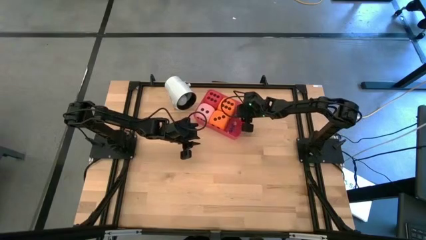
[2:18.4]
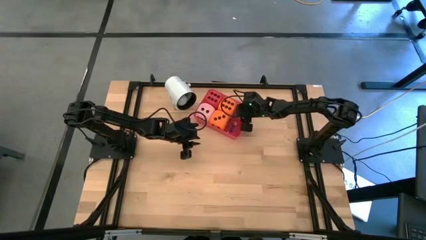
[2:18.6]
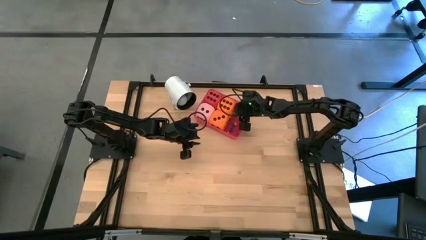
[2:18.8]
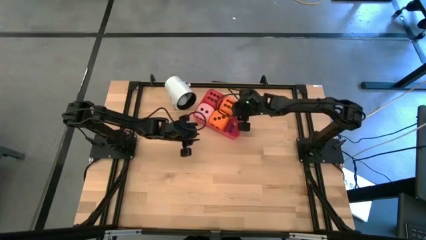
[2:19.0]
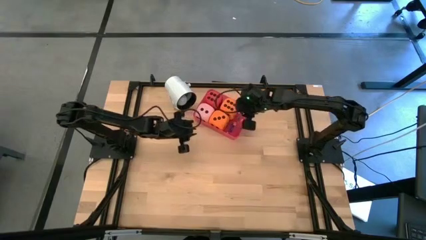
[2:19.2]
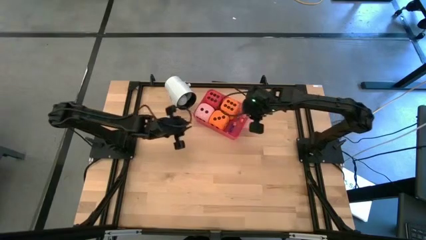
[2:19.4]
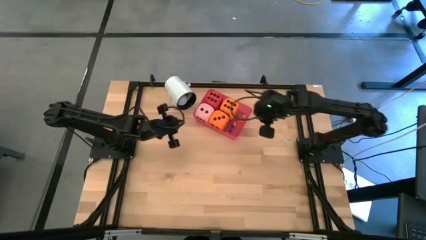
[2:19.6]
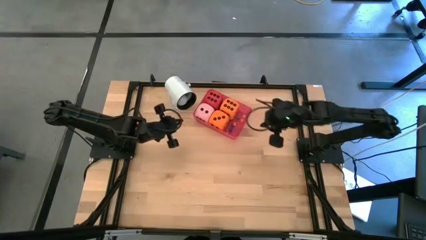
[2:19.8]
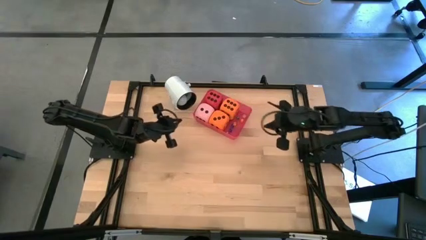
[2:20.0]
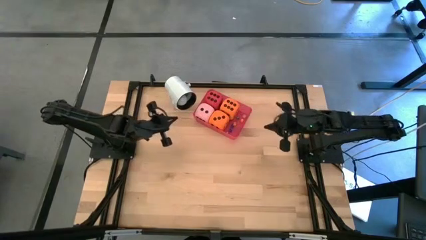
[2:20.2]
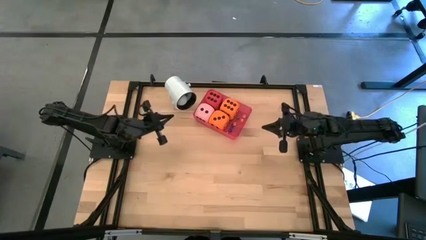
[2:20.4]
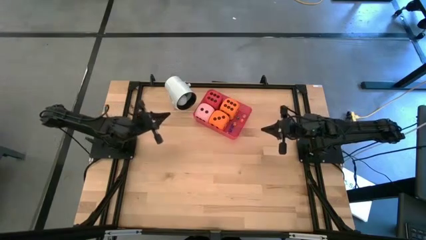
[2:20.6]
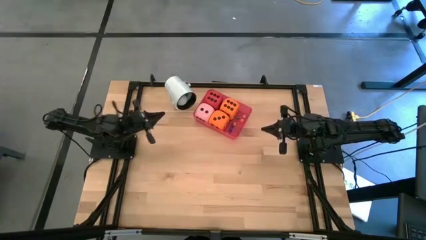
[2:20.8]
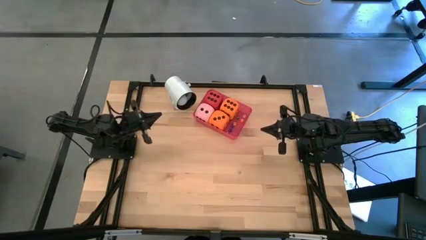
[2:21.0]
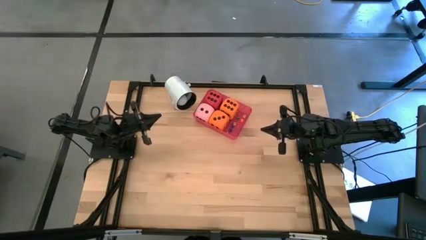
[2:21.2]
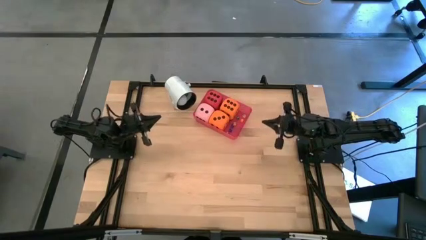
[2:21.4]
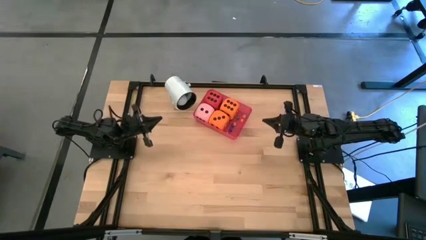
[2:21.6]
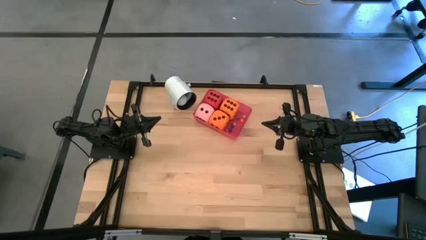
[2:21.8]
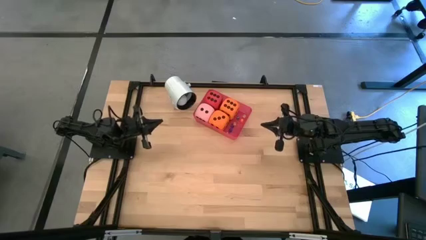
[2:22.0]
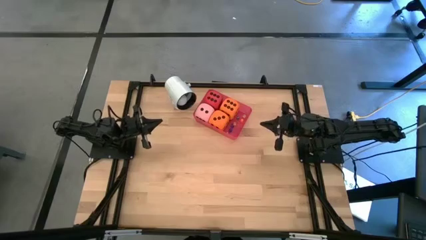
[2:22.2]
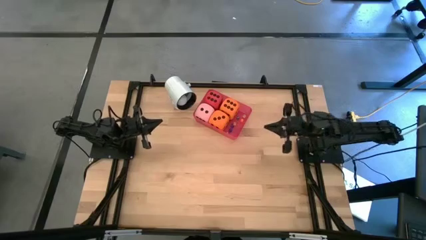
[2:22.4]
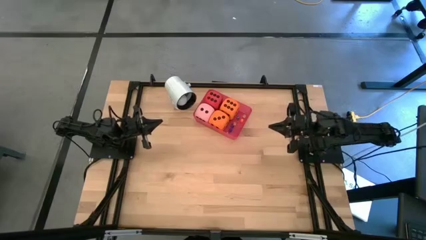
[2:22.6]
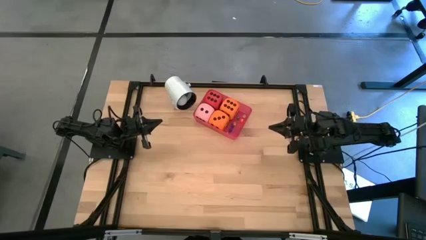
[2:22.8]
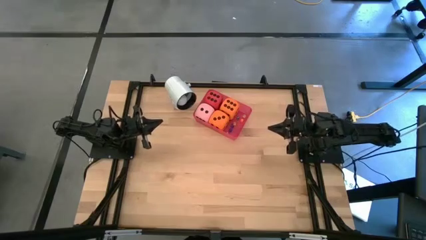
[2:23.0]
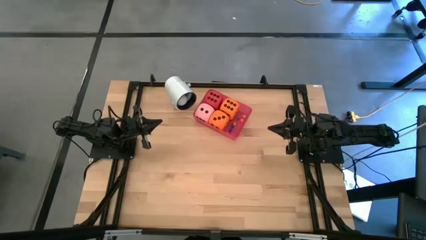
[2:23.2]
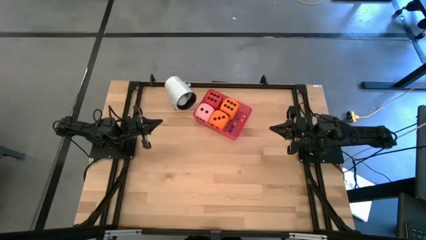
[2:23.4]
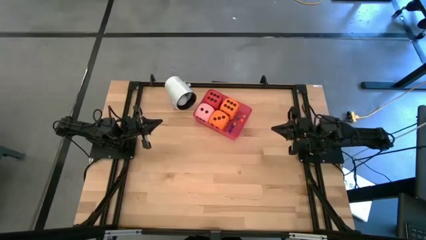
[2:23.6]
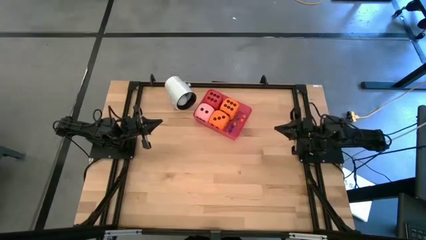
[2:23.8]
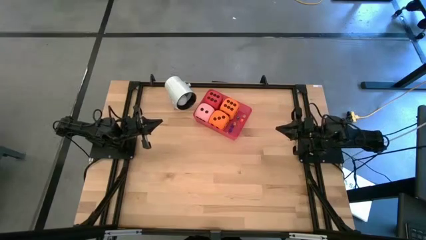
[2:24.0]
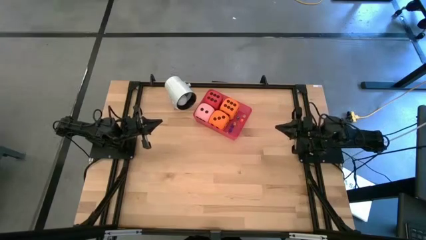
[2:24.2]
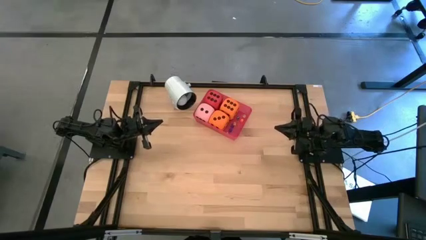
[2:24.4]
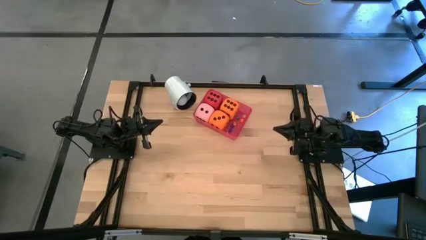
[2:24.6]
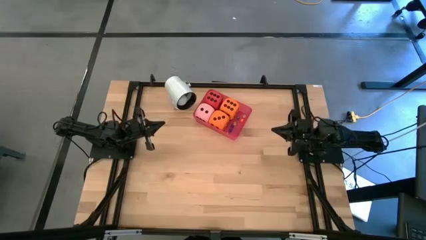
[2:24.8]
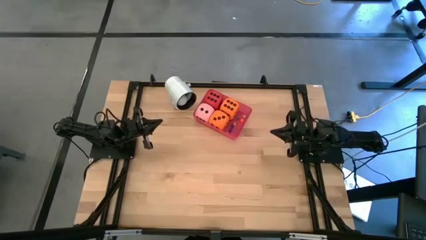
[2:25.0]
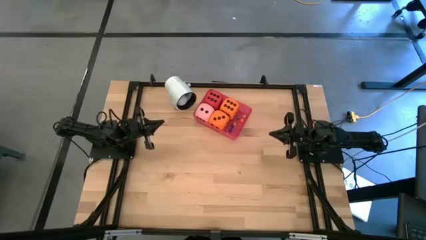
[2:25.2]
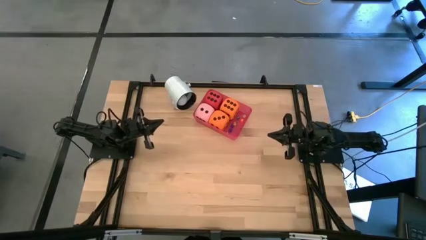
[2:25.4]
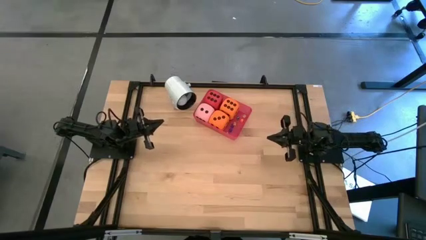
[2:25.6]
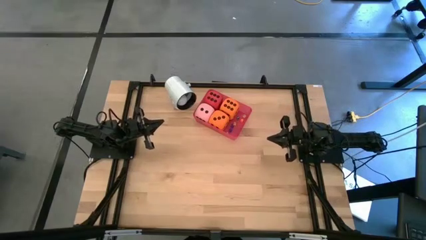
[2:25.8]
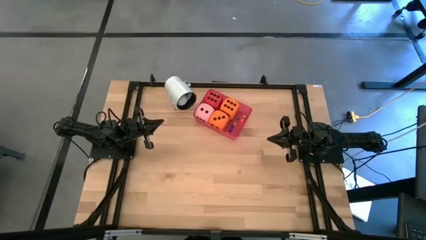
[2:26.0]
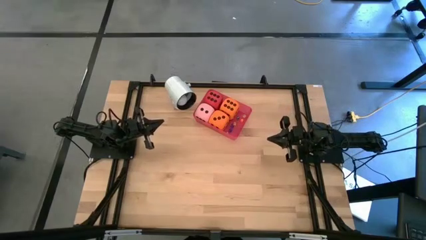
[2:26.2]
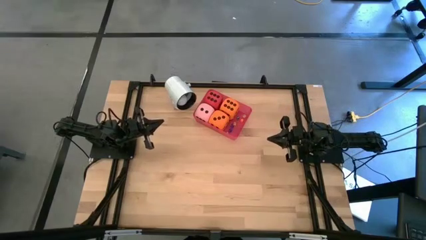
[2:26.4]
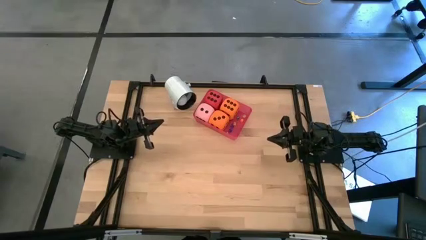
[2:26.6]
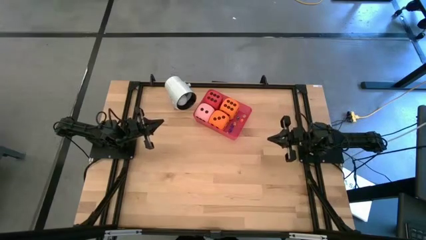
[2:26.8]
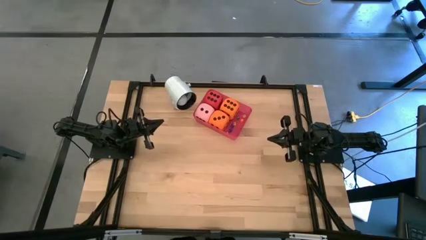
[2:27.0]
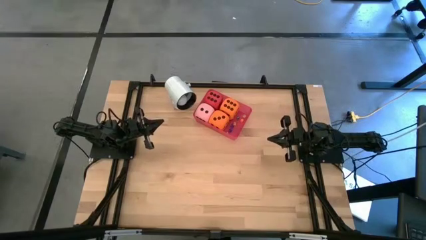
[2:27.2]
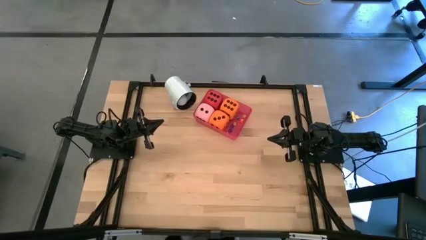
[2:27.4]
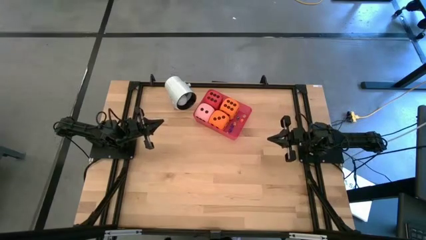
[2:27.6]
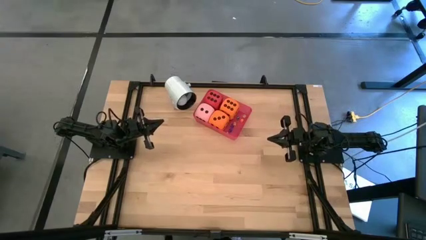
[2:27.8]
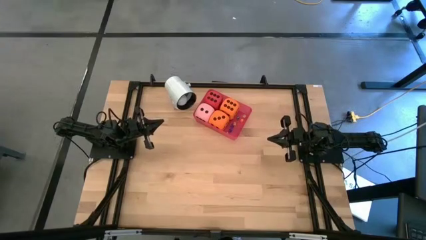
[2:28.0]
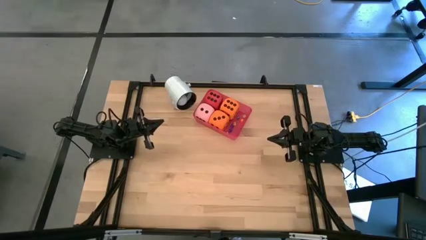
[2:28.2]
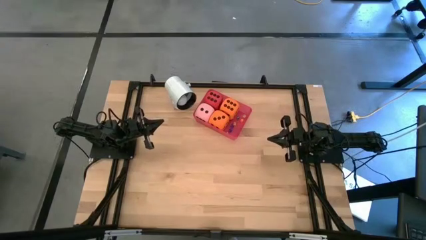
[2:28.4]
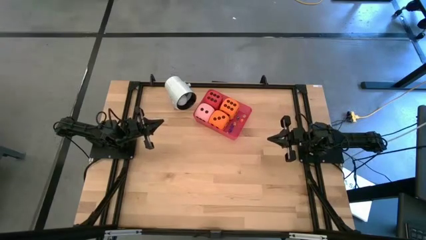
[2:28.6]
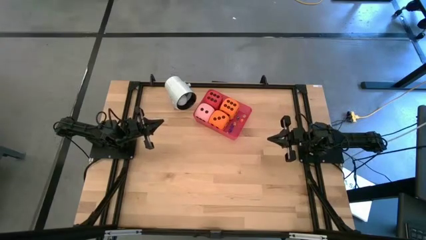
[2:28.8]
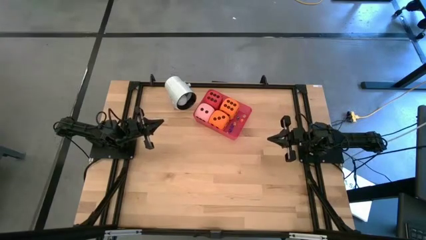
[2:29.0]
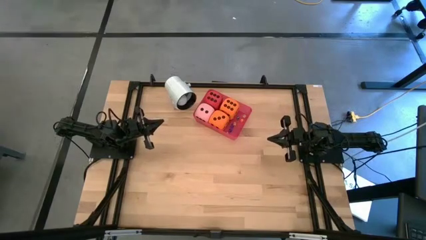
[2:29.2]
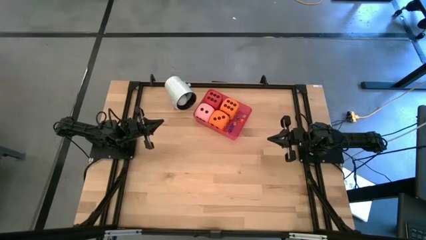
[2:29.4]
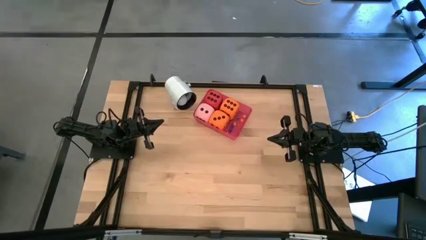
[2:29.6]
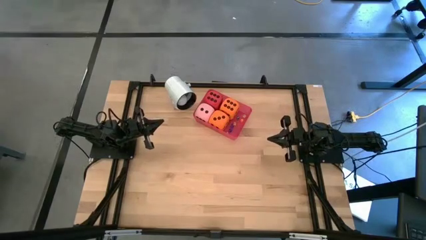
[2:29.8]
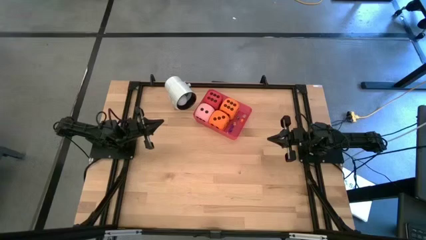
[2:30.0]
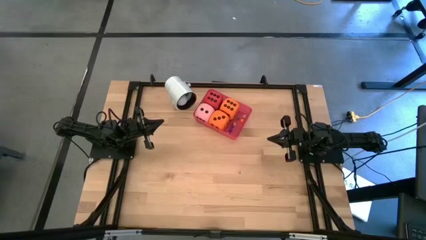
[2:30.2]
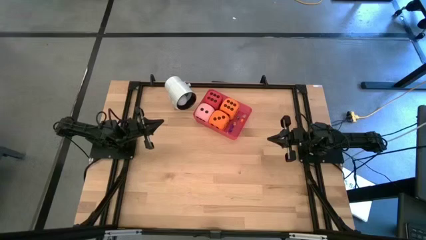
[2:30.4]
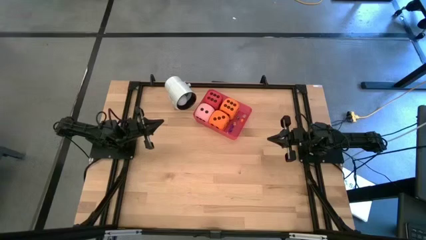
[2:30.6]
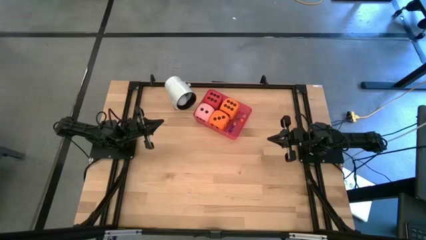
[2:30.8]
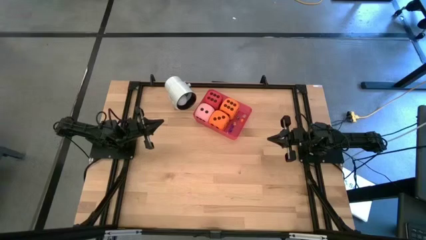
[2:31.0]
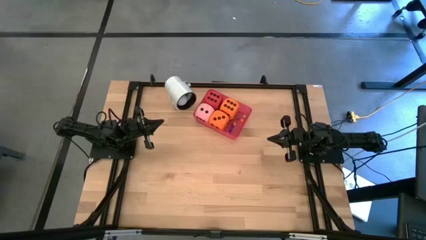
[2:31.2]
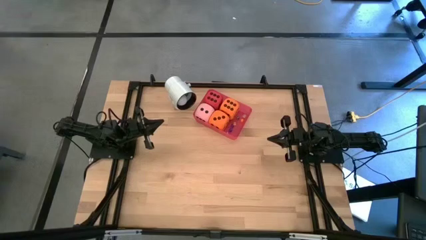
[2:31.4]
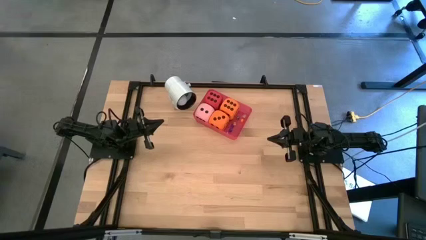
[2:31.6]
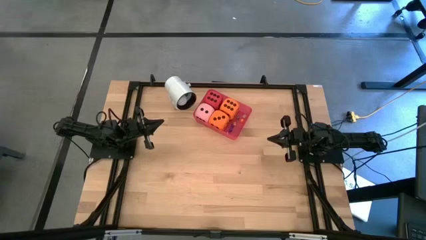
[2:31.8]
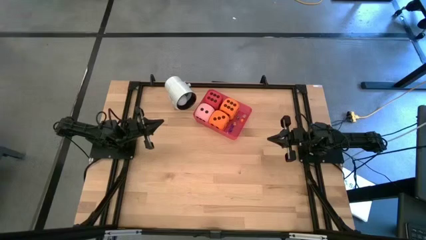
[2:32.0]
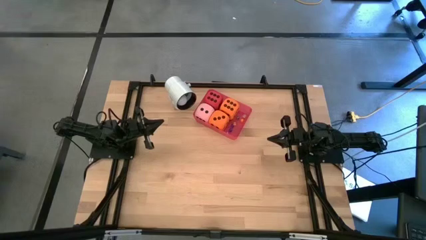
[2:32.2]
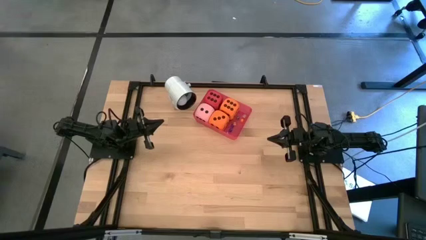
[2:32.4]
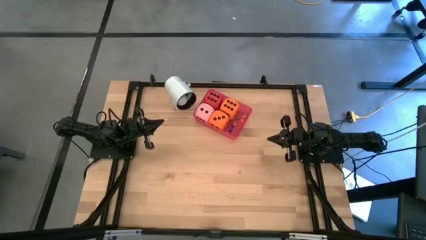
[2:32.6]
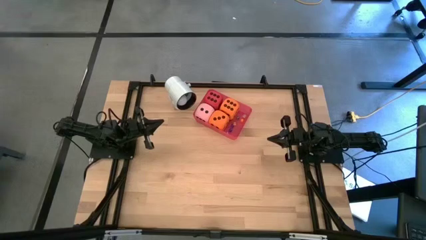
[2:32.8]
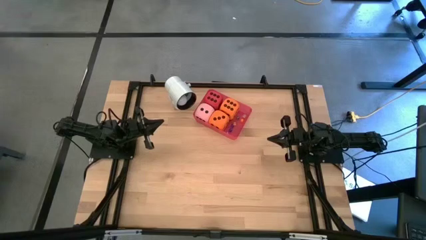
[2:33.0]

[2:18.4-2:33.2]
Task: Pick & Place Dice
Return to Home Position

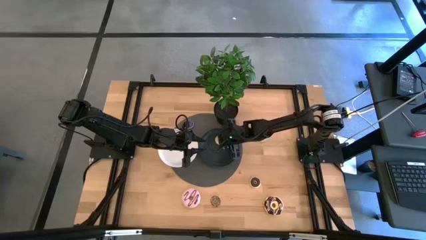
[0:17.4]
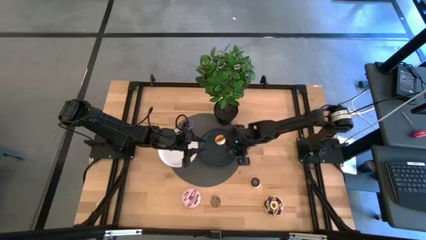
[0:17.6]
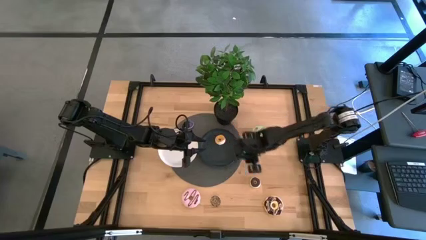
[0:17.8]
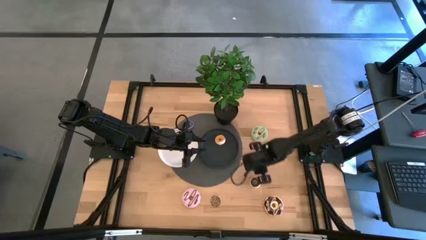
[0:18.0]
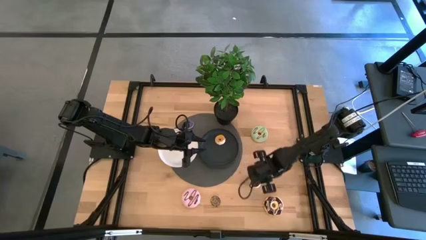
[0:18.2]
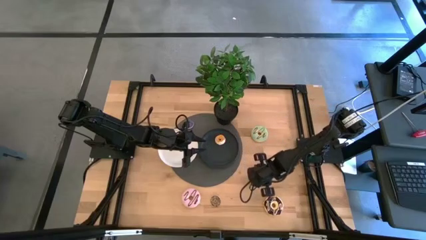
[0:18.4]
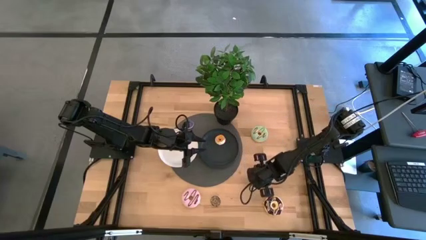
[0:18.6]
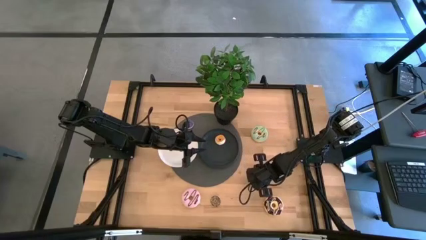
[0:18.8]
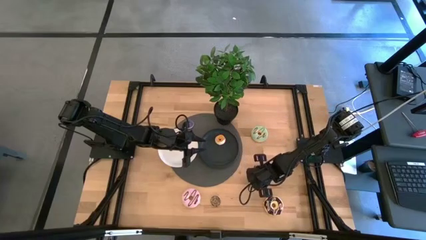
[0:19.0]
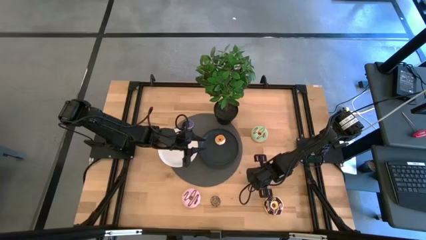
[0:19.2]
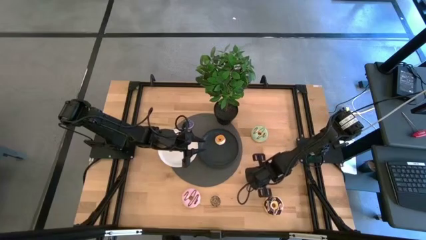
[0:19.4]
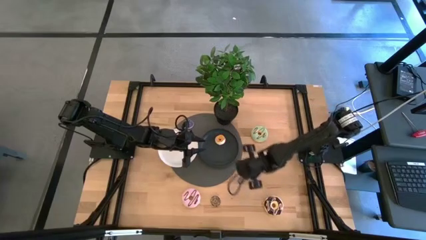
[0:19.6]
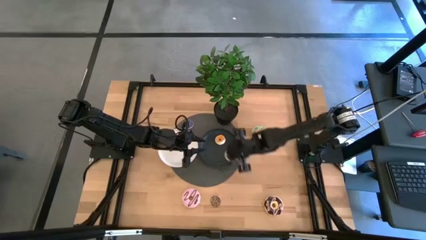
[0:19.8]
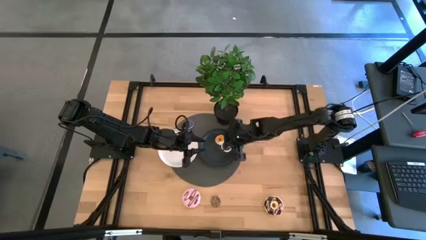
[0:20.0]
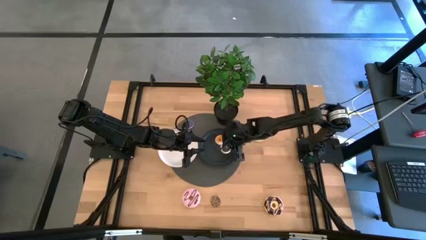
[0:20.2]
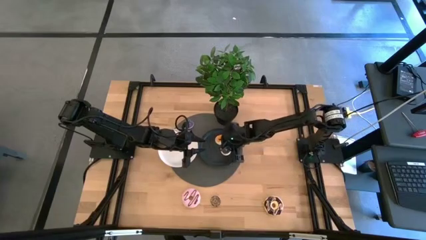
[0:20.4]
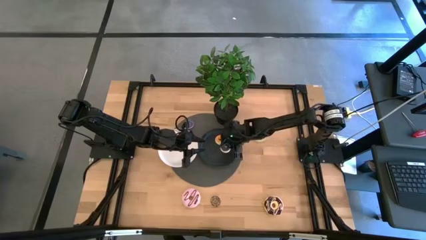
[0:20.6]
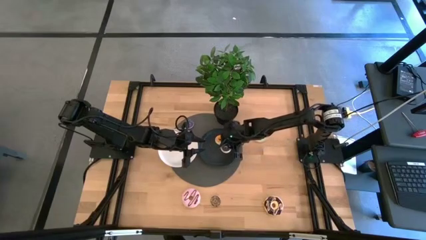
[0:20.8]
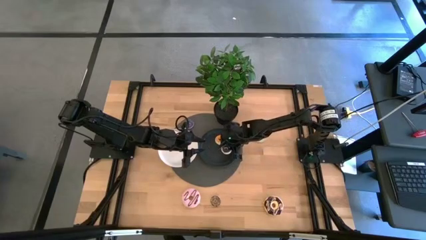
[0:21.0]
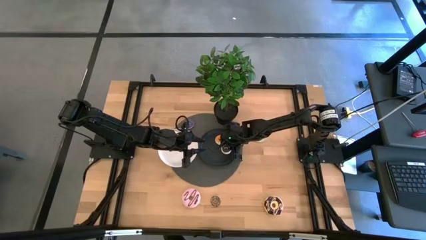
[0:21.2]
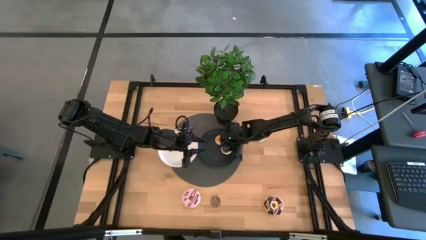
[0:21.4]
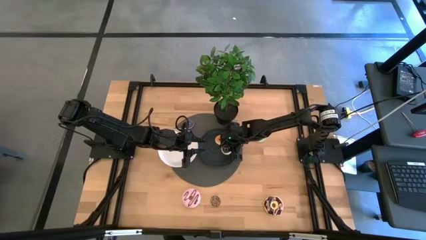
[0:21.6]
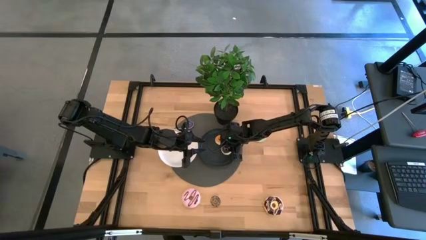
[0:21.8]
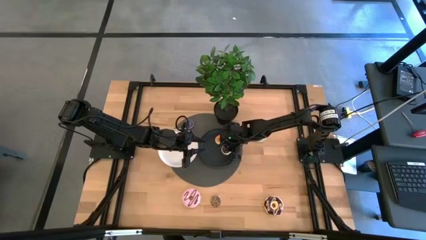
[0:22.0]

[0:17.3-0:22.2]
Task: Pick & Place donuts
Put the small black donut on the black plate
